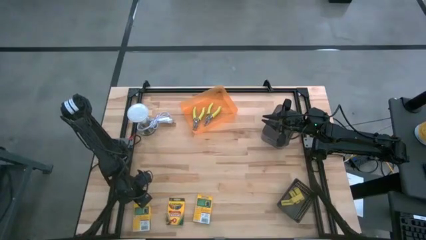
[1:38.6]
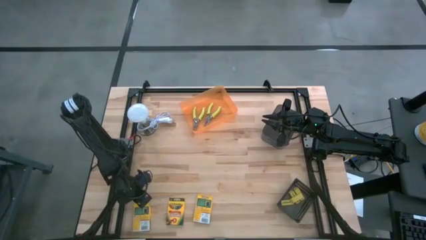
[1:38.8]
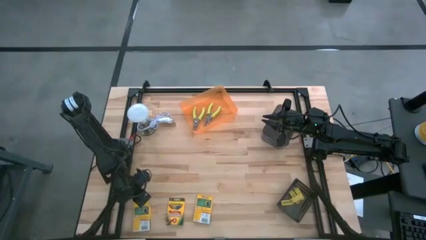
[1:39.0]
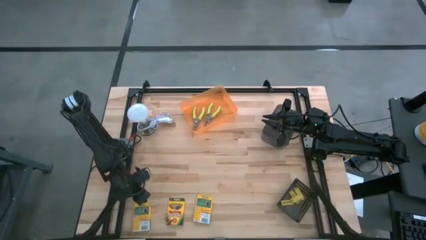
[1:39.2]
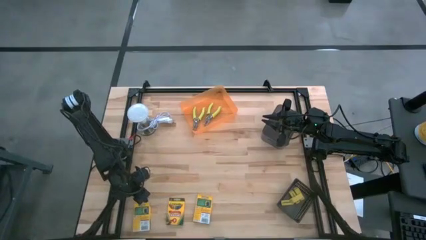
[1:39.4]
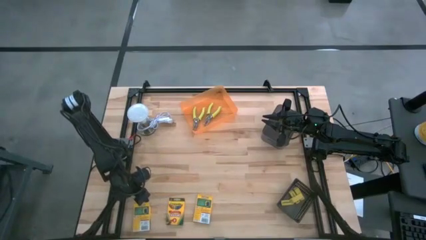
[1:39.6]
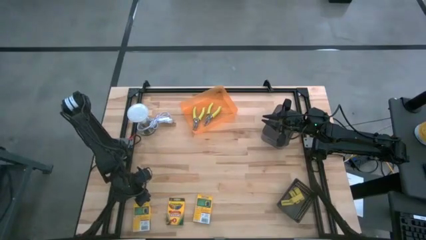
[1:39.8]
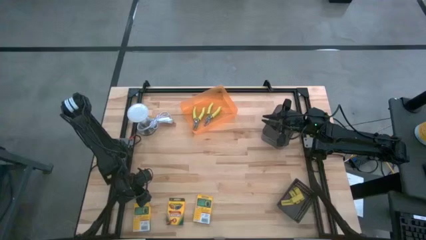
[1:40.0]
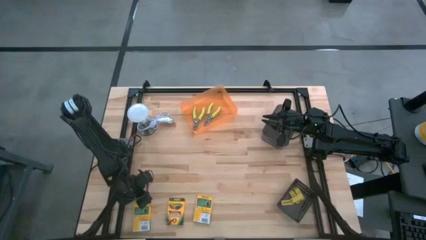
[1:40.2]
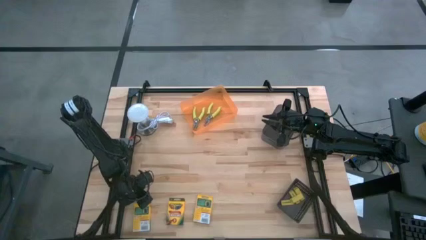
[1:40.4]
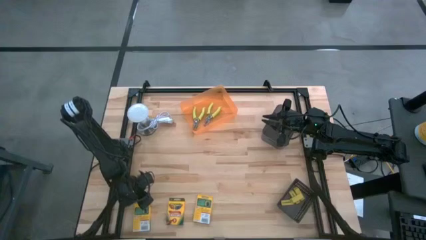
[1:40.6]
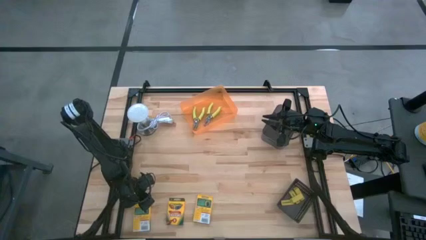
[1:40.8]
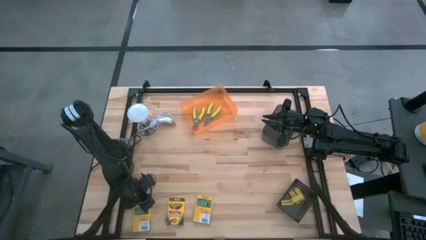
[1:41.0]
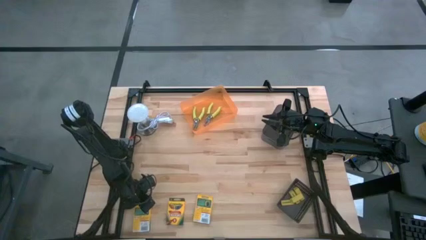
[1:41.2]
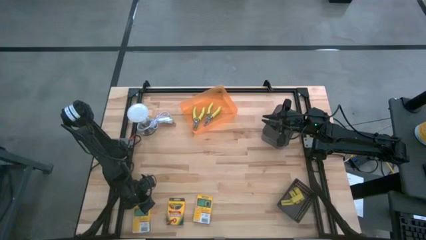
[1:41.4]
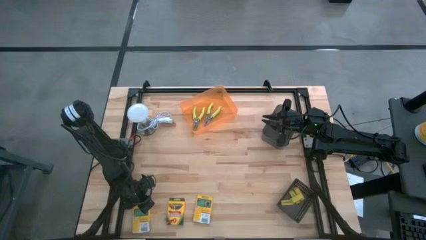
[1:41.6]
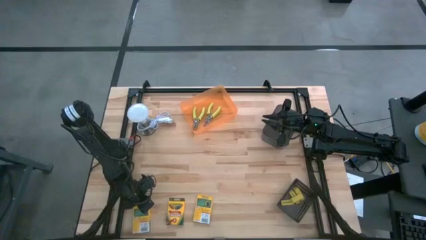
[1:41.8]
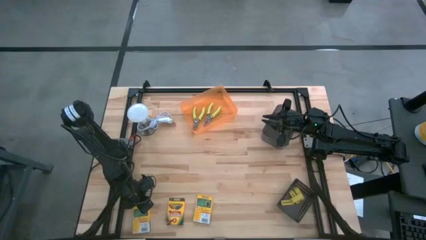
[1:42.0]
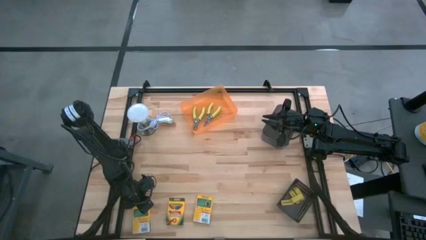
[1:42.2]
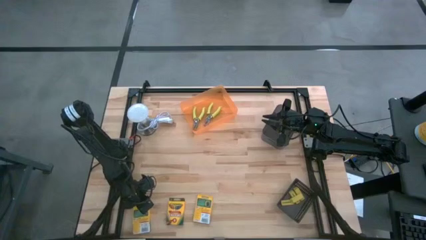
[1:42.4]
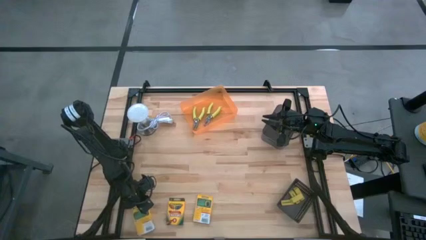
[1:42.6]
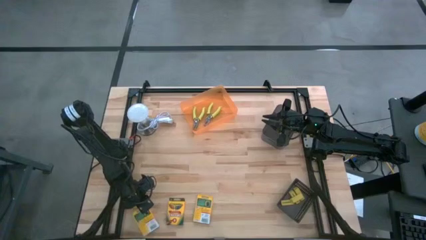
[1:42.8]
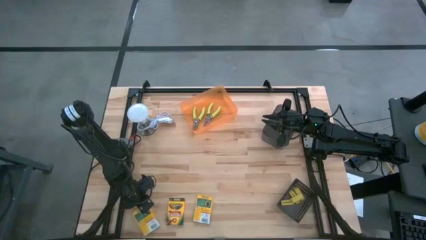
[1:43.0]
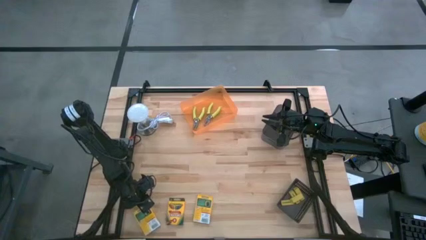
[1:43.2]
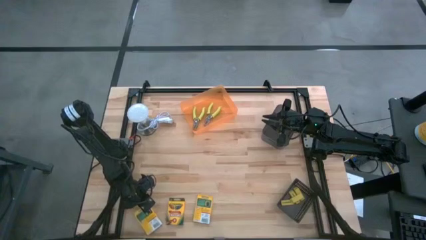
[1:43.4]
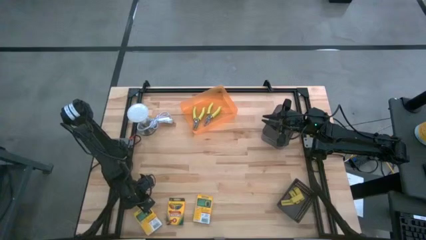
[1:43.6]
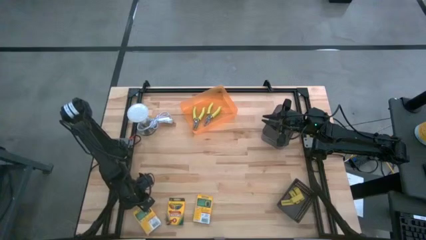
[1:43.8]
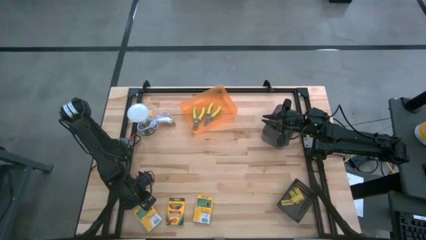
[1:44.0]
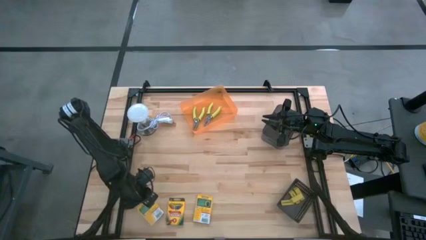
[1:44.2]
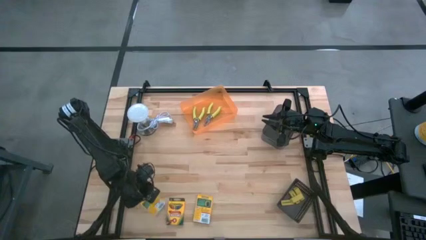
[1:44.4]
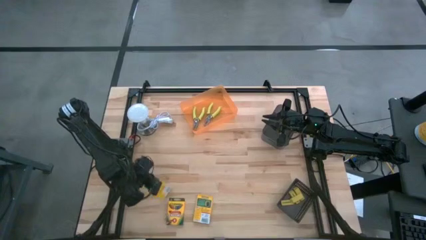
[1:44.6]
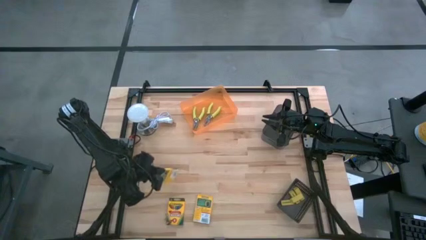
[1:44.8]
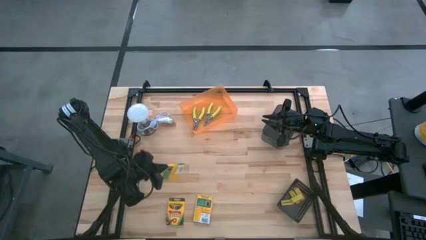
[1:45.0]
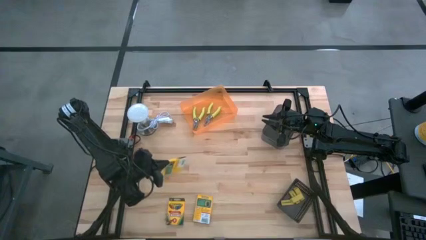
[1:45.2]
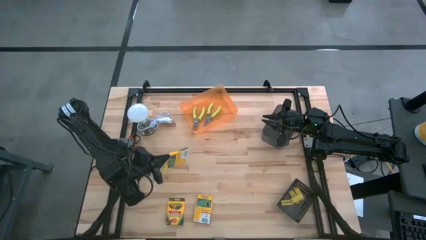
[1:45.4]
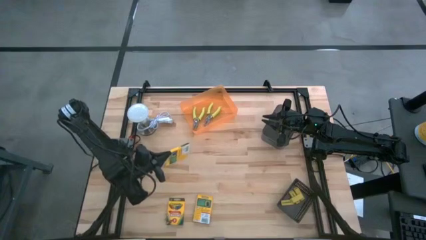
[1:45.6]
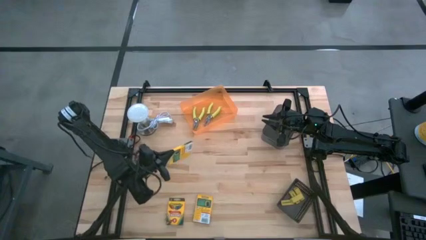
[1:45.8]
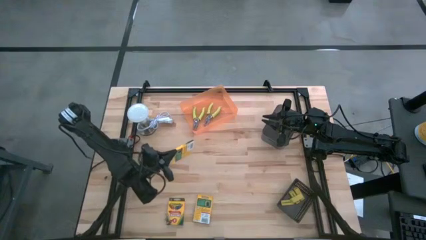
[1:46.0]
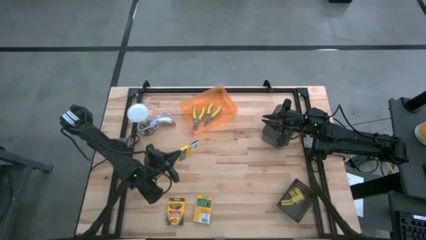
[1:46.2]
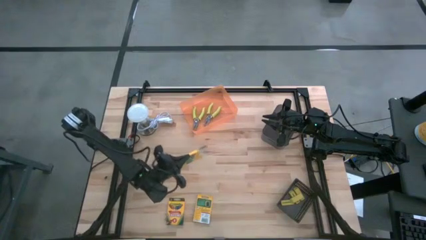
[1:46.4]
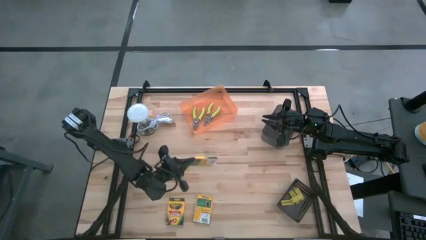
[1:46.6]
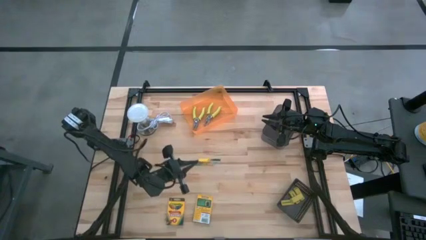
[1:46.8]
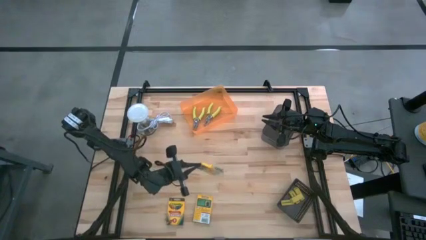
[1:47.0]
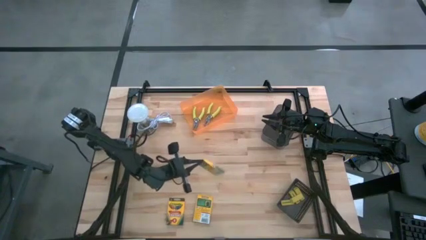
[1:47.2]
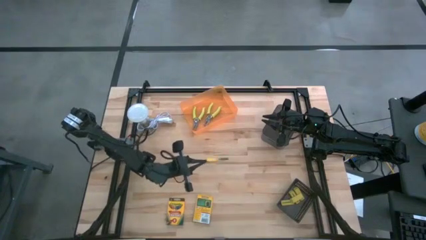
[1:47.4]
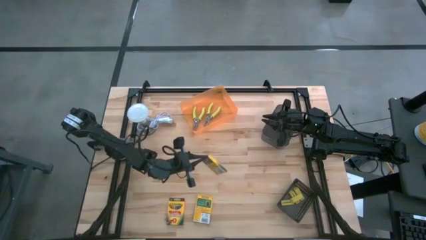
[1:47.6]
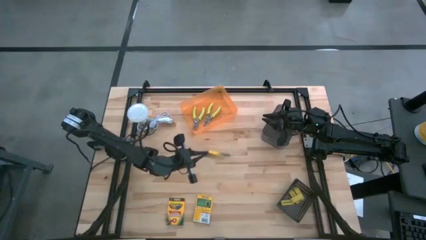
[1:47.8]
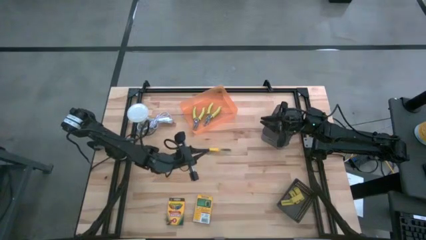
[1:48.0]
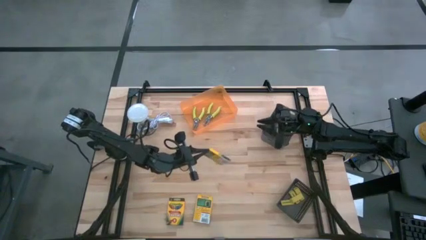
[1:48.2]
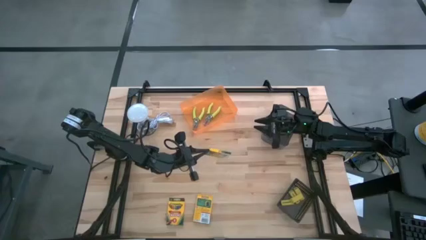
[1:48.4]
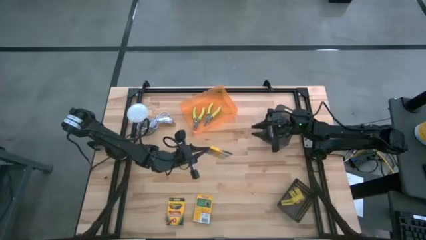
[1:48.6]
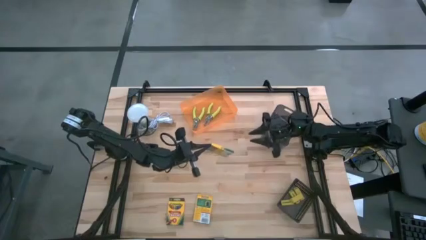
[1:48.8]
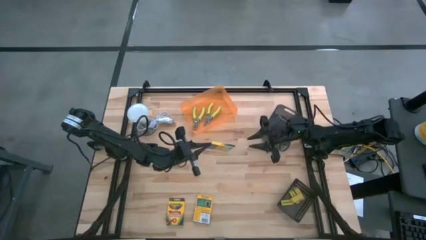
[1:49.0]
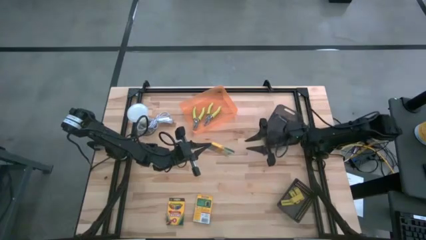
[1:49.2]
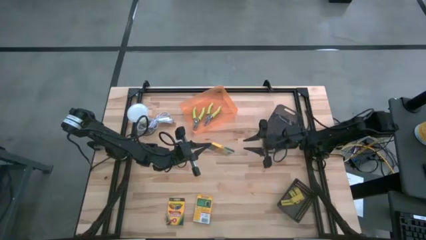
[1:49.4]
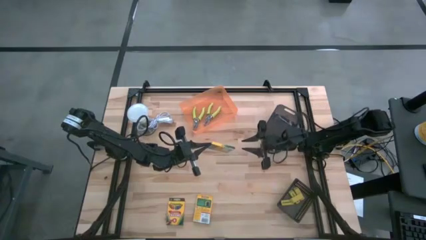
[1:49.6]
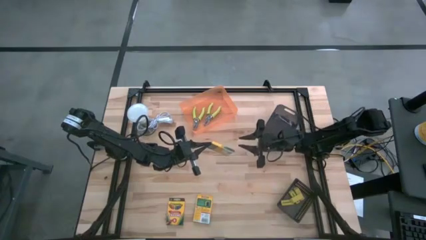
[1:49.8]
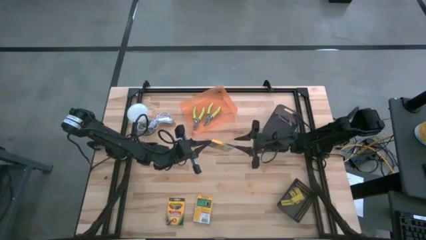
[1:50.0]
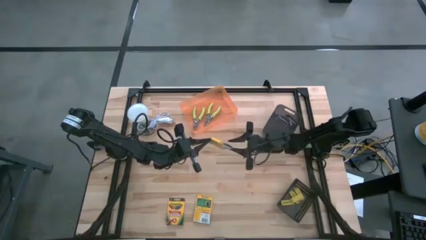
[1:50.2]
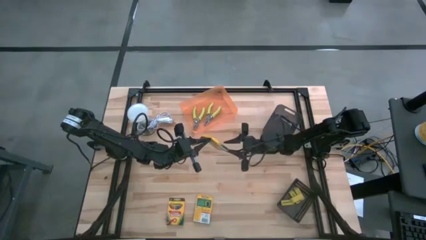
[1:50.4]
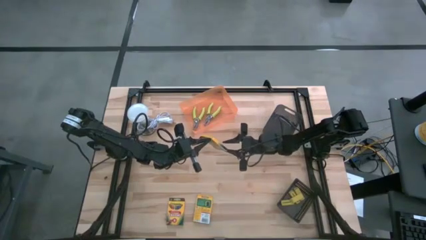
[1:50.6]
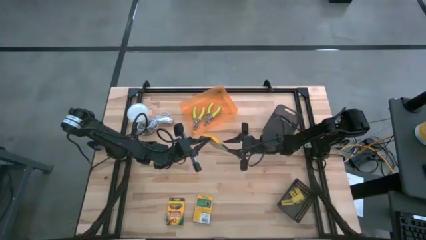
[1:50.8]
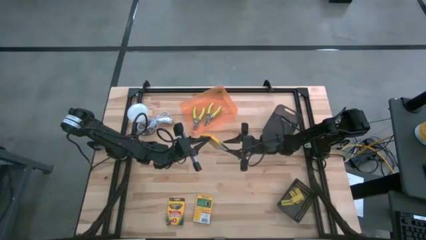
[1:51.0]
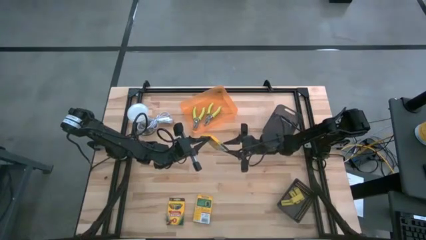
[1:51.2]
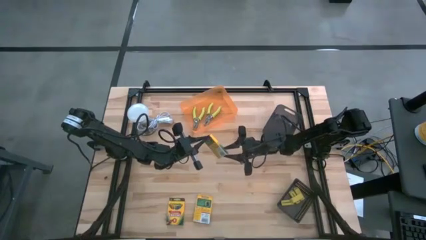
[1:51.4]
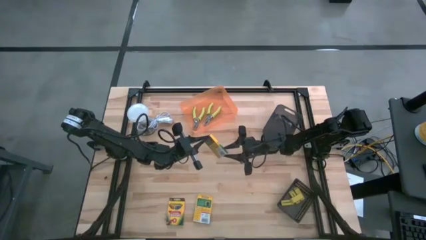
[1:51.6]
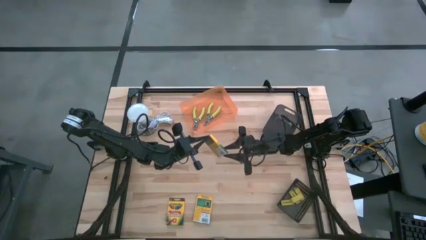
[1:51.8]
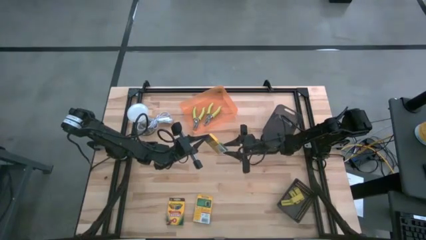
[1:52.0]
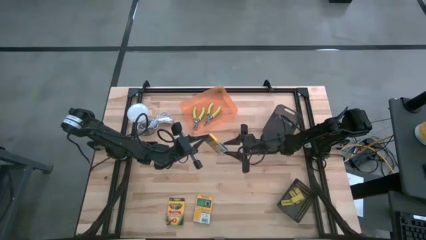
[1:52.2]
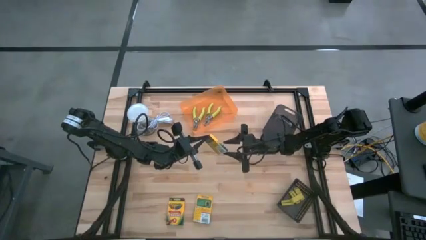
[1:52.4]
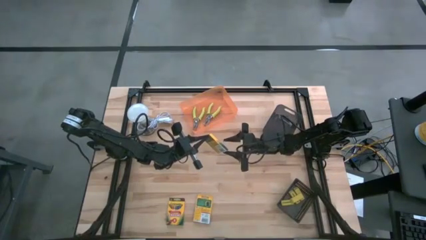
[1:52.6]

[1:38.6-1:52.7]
Task: Pick & Place School Supplies
Put the crayon box into the light black bin

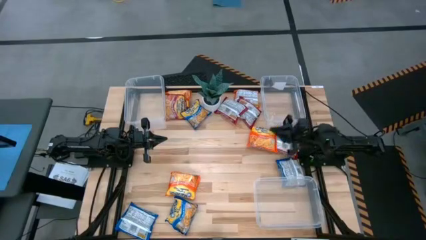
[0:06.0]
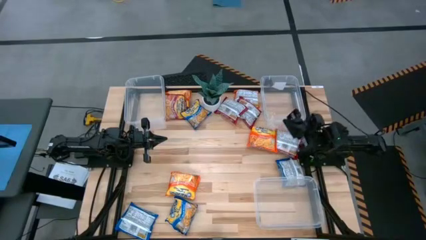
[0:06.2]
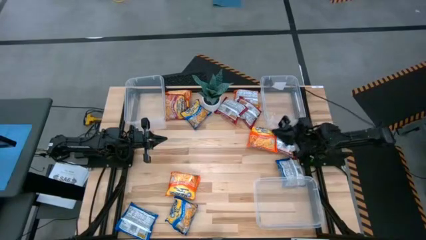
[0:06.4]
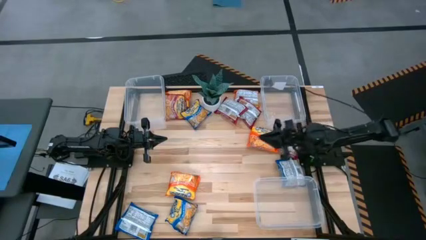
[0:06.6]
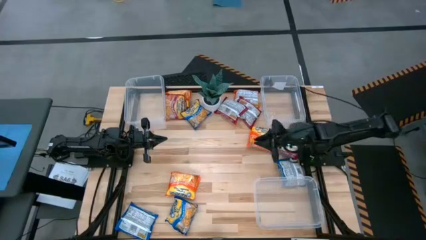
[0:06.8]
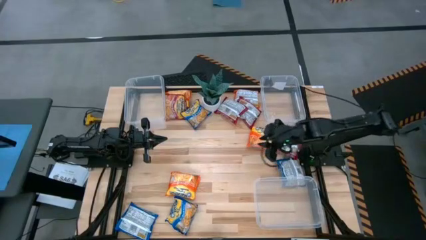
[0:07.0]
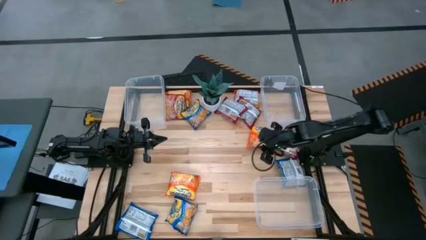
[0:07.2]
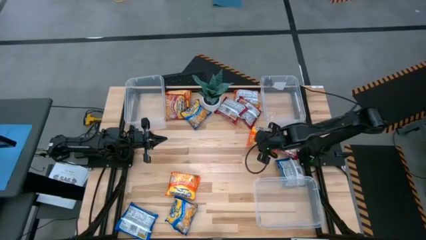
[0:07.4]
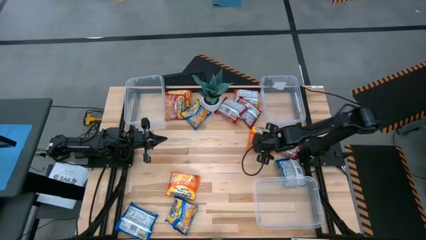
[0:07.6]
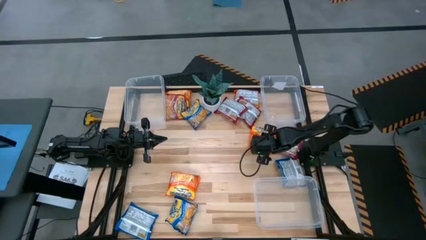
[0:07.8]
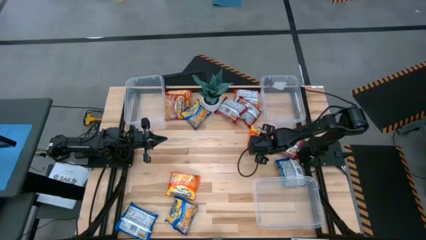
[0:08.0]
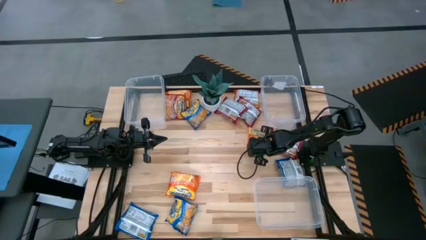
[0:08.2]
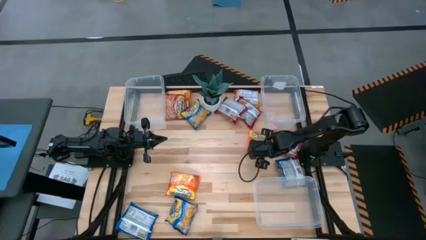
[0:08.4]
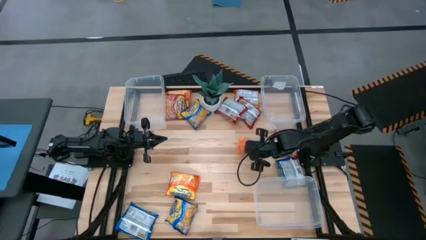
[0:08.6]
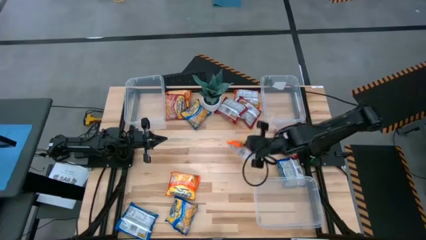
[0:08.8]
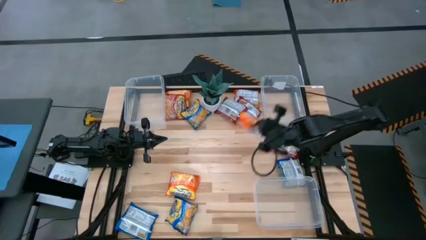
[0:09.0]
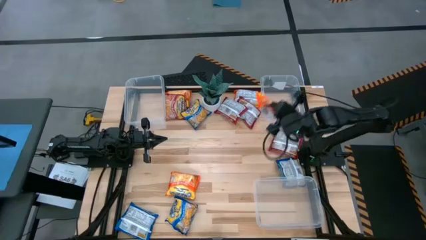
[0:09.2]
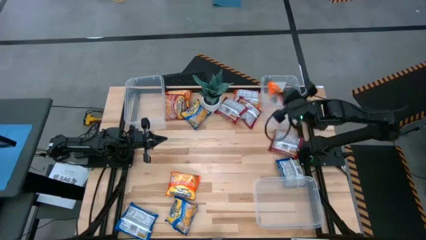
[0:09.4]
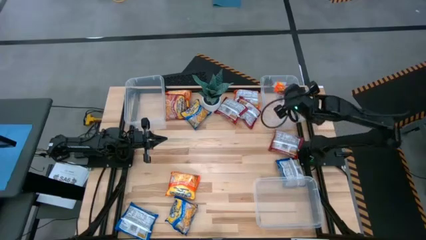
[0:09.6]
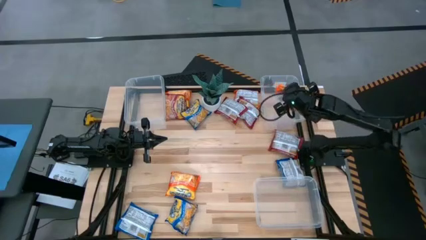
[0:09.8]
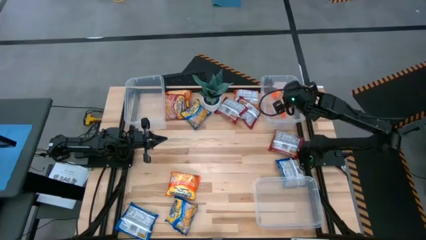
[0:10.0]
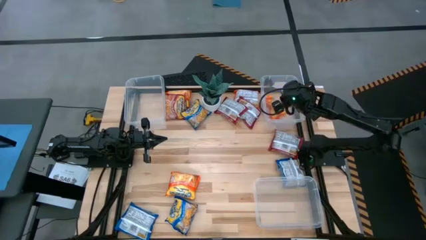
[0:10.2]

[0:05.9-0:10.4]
Task: Sort Maruchan noodles
Put the orange noodle pack in the top right transparent bin
